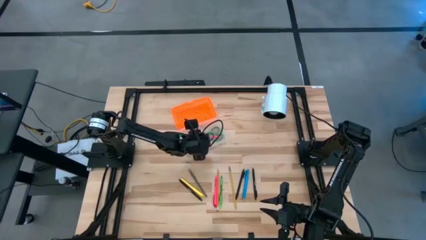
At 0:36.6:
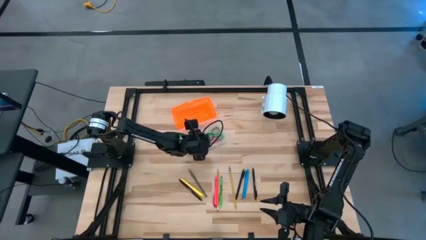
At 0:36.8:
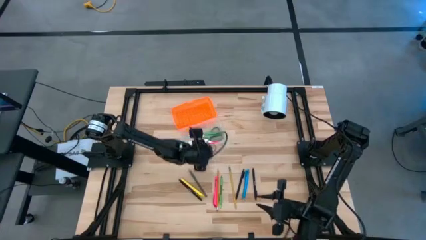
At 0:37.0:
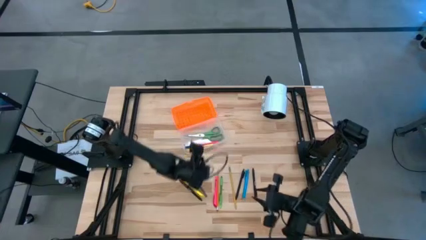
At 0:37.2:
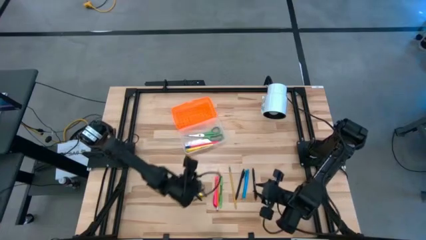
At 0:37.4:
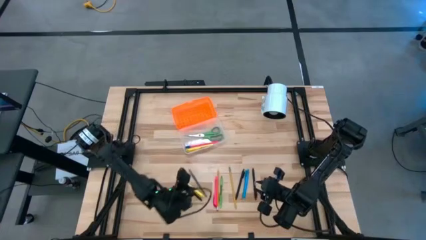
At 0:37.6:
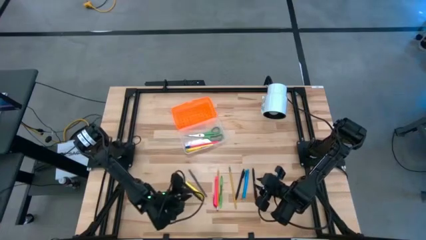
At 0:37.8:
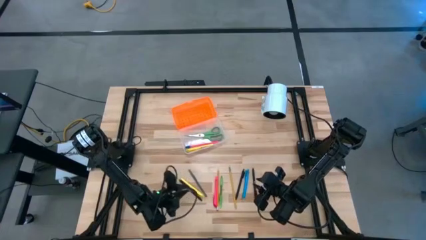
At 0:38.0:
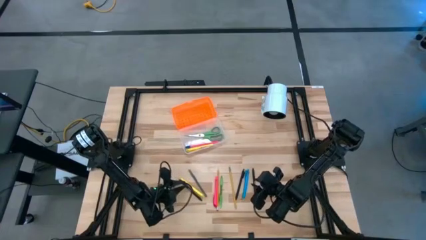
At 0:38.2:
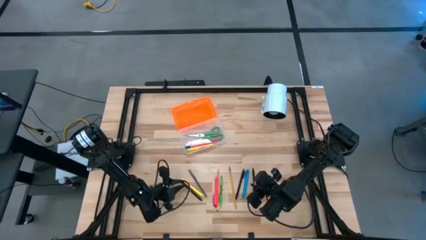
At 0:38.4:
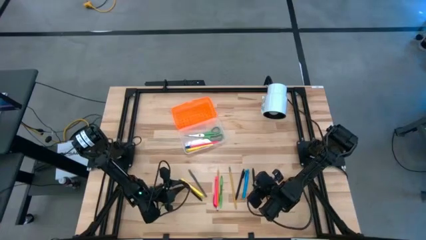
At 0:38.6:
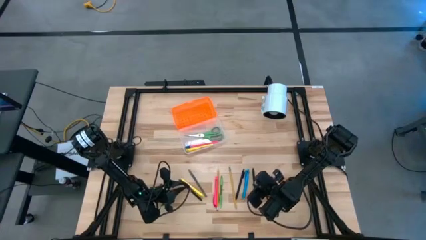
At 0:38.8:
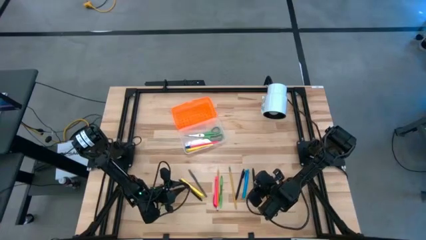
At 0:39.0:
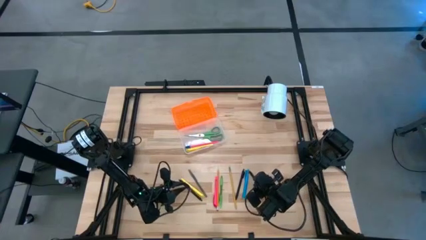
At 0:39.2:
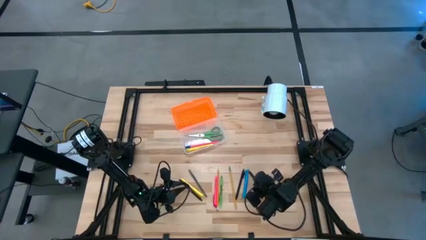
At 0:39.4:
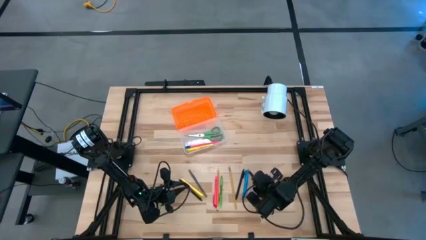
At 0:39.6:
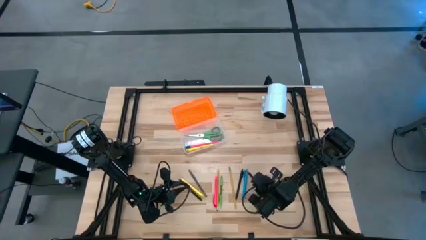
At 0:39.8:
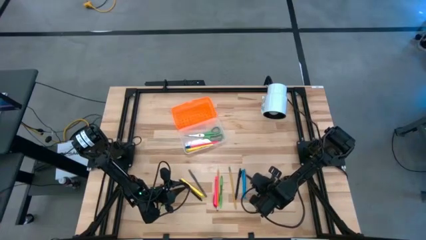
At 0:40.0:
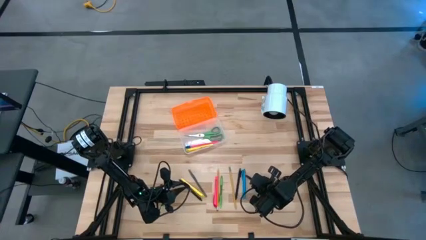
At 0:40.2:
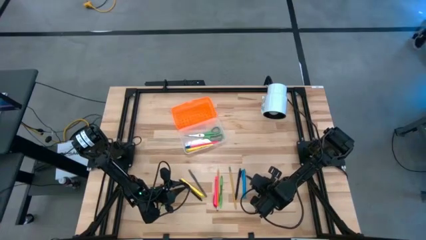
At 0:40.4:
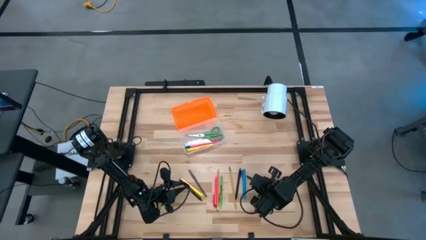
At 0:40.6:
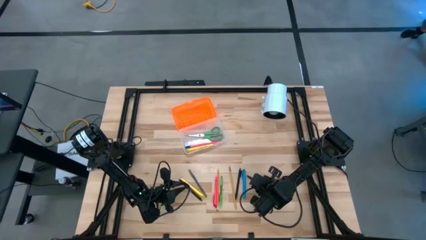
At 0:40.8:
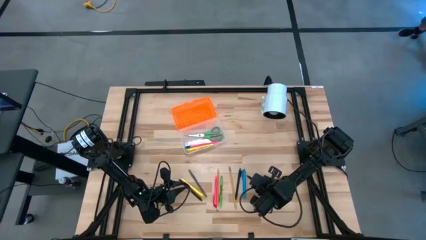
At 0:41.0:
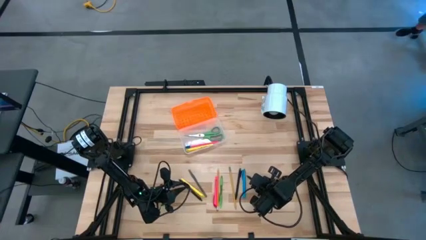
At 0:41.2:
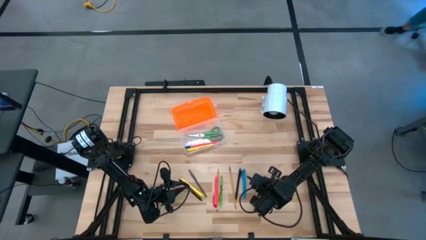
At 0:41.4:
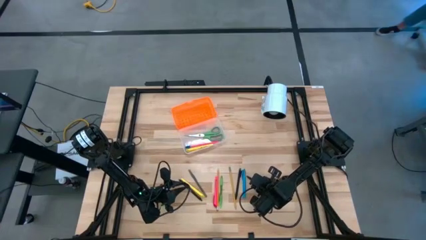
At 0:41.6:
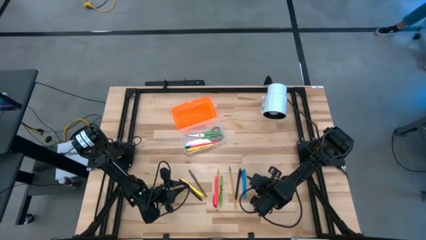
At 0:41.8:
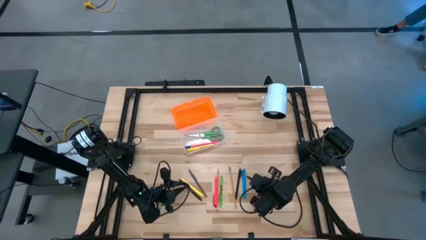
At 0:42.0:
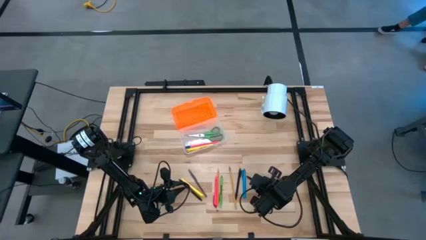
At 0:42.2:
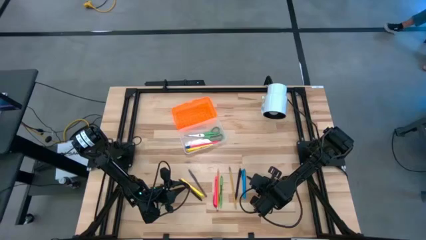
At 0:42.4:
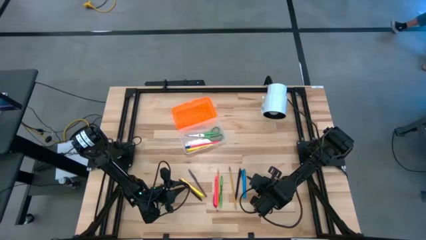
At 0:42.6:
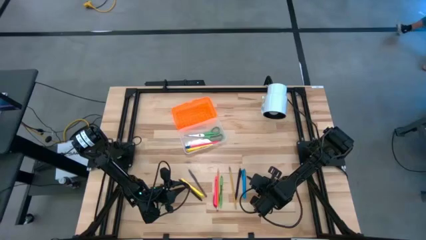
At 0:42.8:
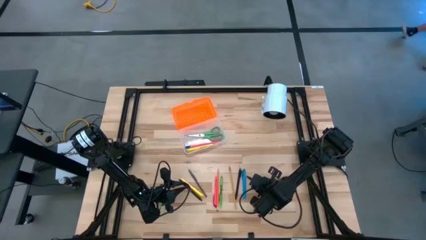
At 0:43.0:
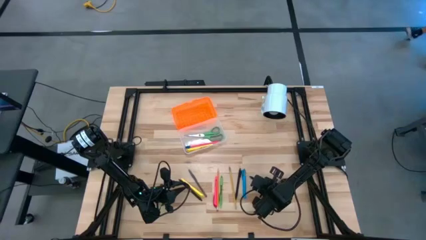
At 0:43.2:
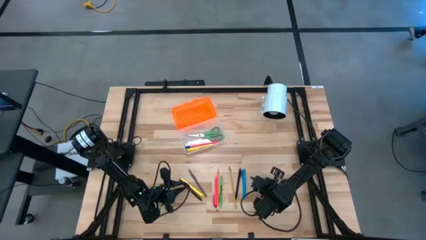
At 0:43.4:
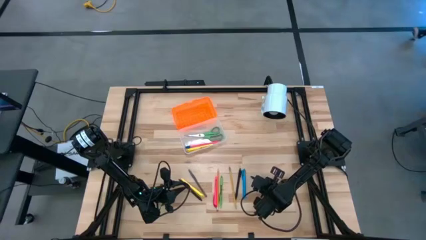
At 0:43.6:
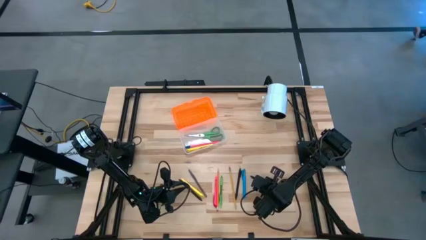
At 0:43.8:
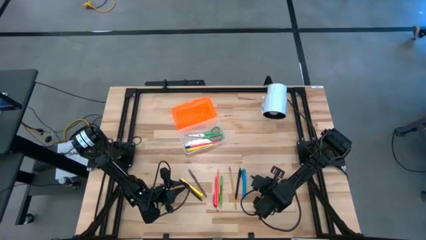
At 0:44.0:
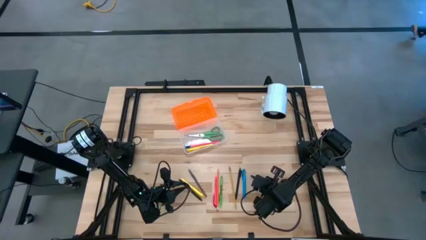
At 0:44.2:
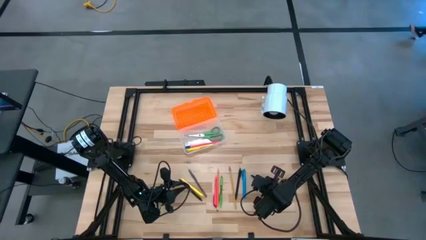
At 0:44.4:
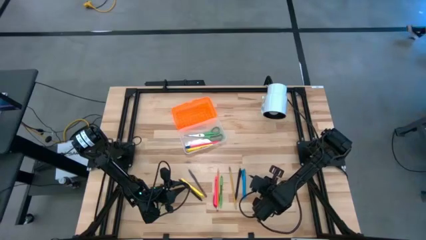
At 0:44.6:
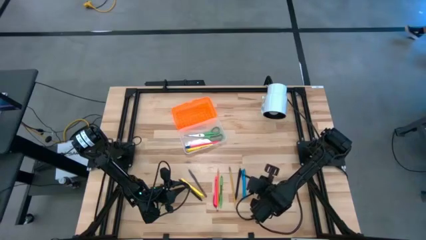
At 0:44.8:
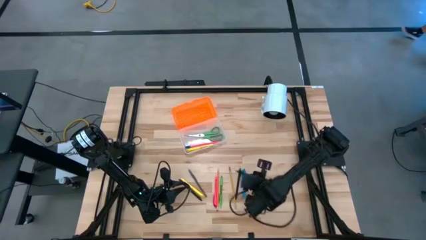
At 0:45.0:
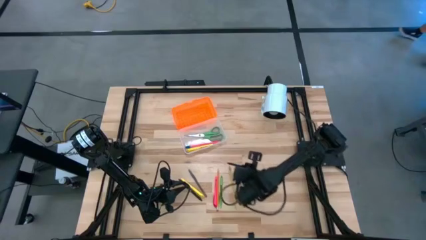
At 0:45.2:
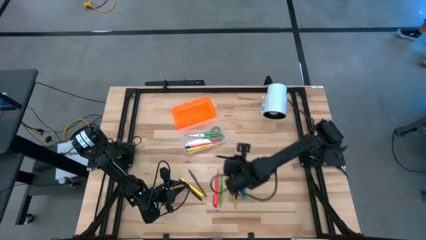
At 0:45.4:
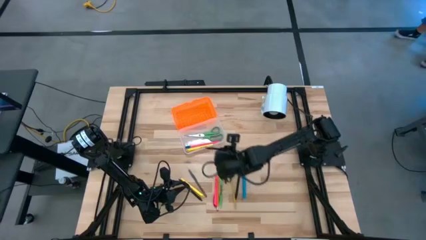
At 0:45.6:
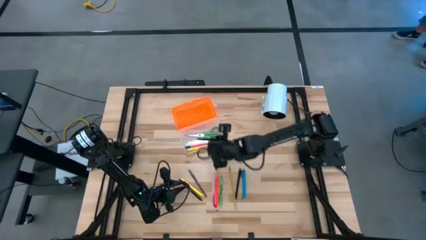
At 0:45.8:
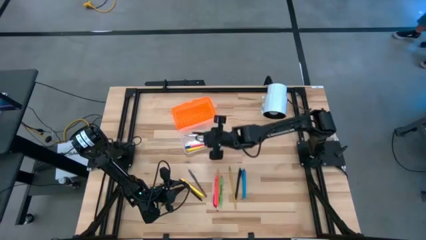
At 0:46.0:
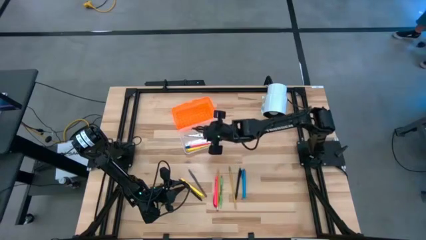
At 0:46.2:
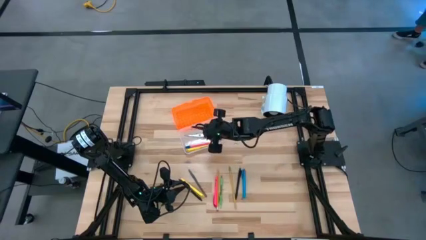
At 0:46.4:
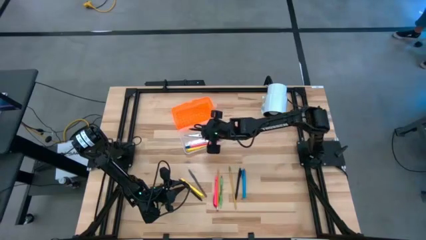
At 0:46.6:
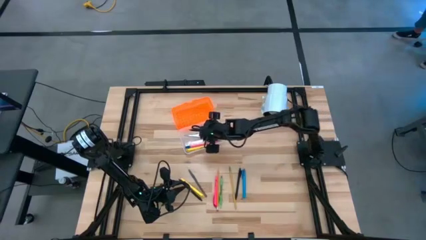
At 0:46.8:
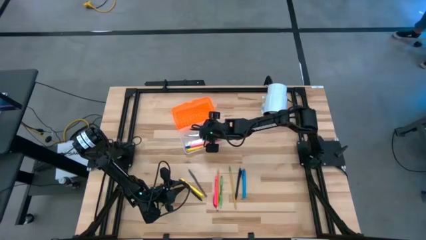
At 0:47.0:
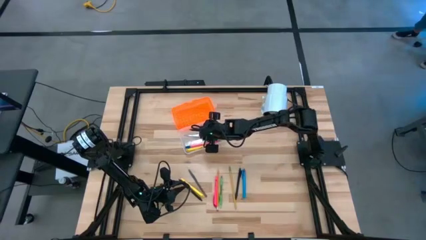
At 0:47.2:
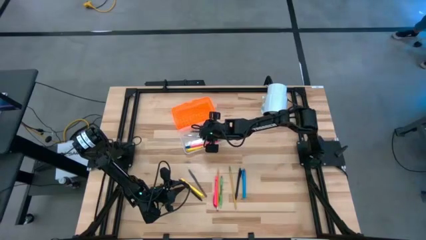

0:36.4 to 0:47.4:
Task: Pick & place school supplies into a supply box
Put the right black pen into the supply box

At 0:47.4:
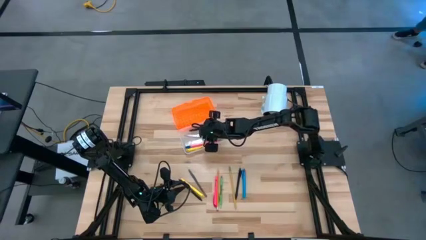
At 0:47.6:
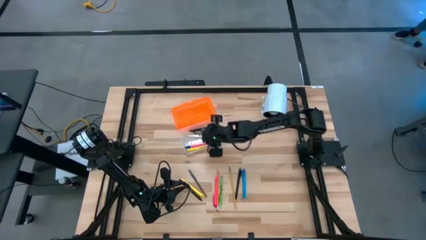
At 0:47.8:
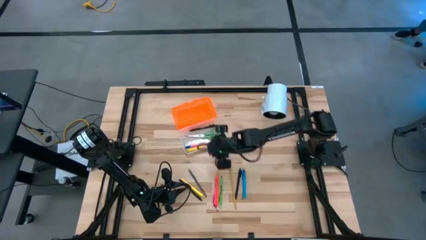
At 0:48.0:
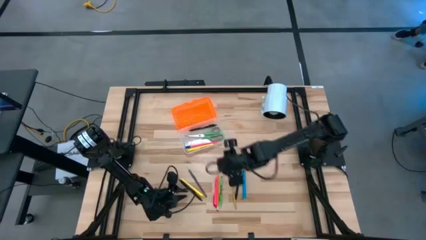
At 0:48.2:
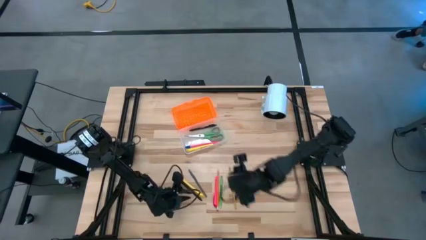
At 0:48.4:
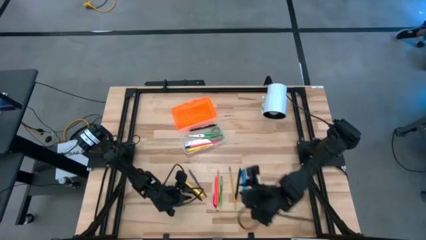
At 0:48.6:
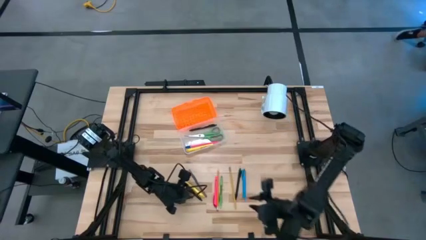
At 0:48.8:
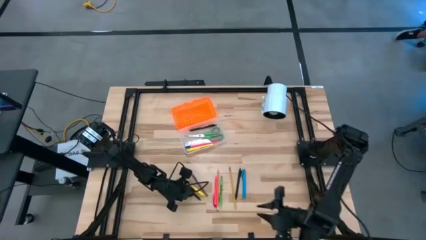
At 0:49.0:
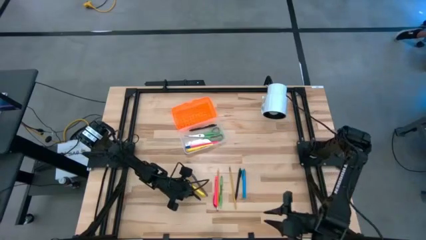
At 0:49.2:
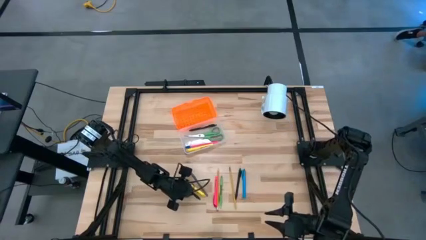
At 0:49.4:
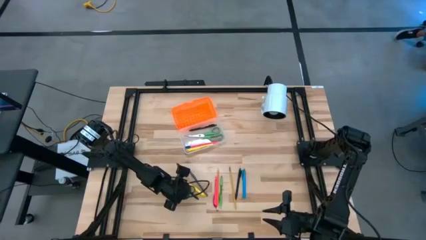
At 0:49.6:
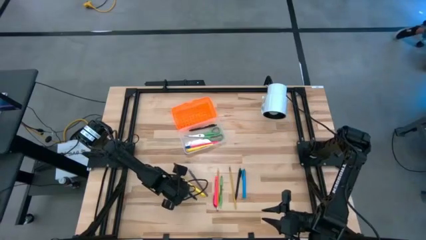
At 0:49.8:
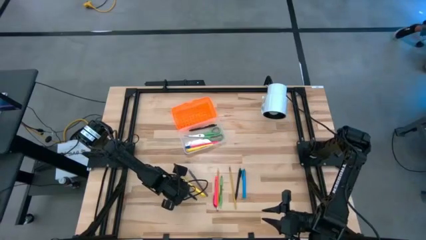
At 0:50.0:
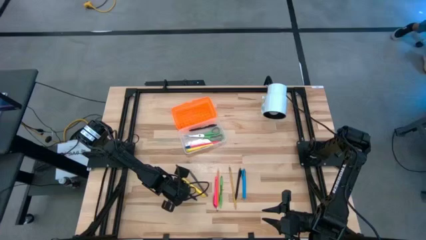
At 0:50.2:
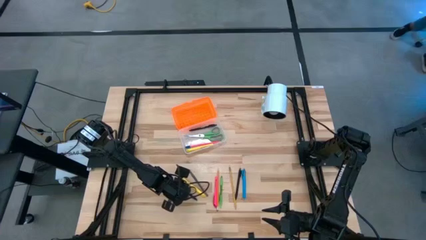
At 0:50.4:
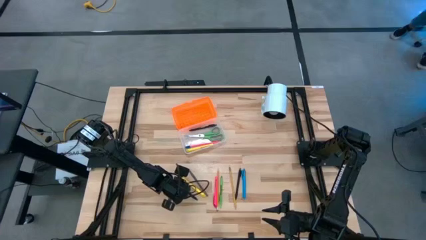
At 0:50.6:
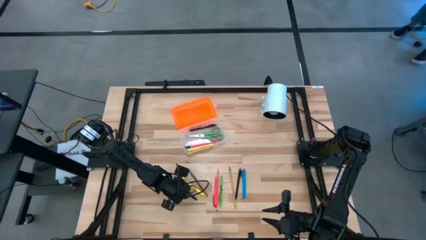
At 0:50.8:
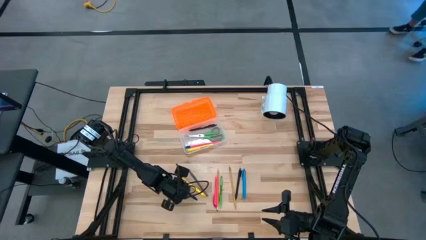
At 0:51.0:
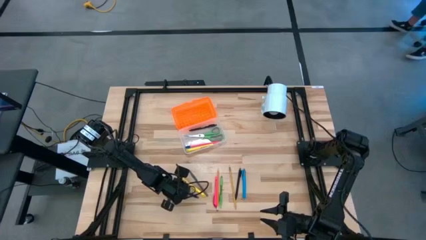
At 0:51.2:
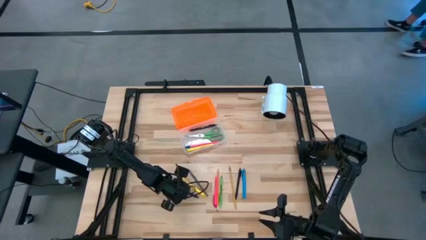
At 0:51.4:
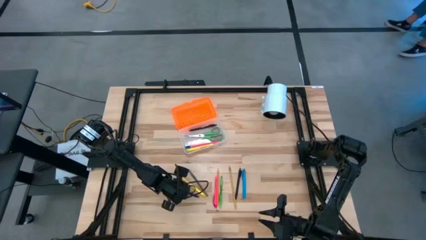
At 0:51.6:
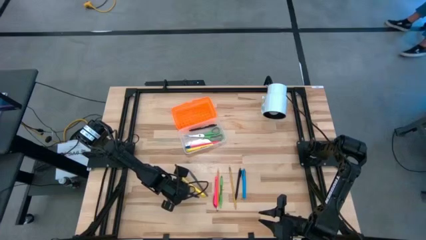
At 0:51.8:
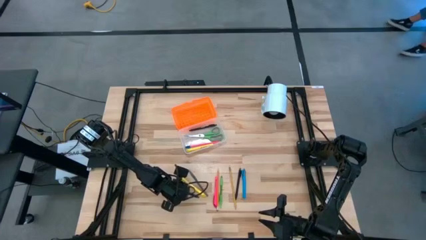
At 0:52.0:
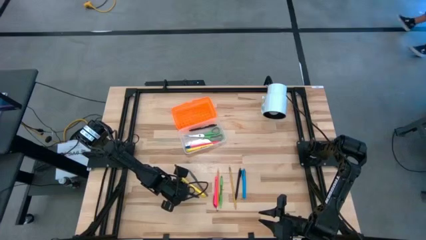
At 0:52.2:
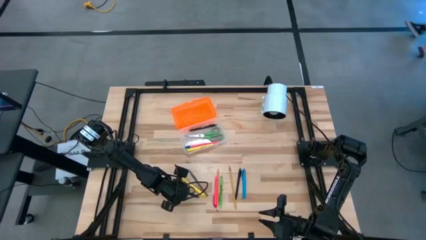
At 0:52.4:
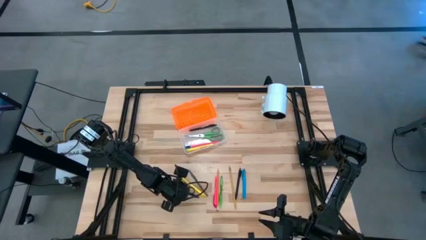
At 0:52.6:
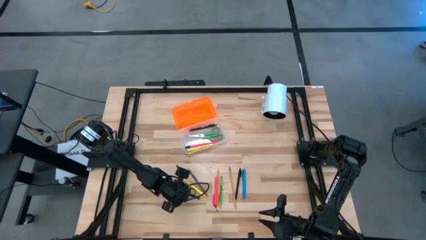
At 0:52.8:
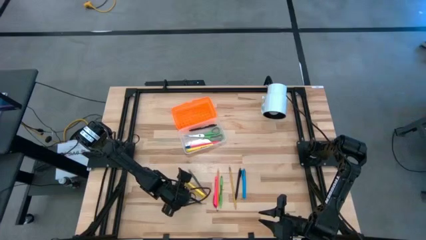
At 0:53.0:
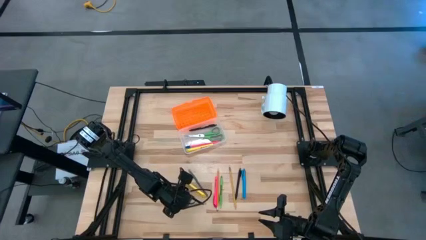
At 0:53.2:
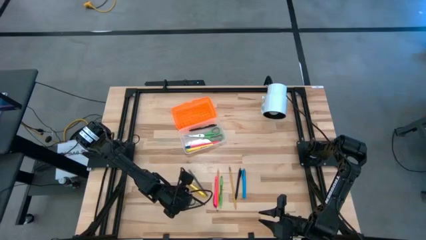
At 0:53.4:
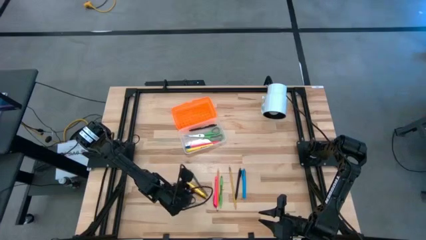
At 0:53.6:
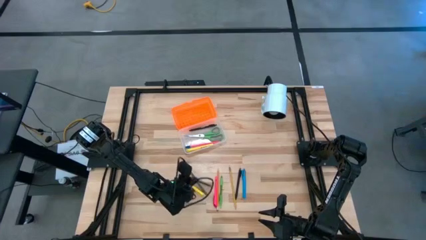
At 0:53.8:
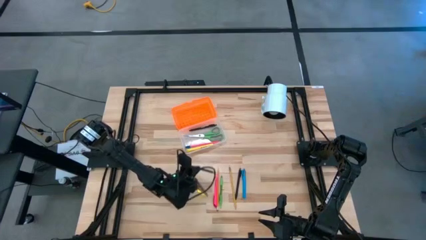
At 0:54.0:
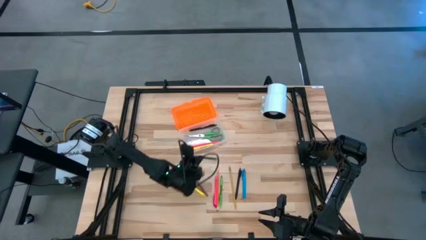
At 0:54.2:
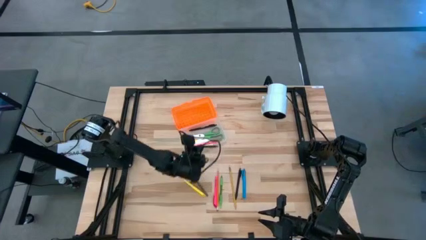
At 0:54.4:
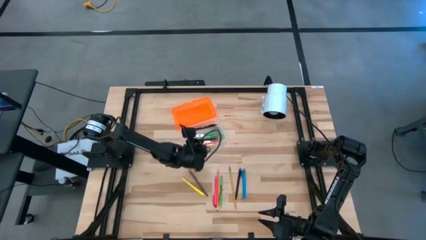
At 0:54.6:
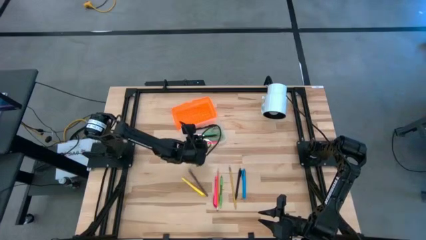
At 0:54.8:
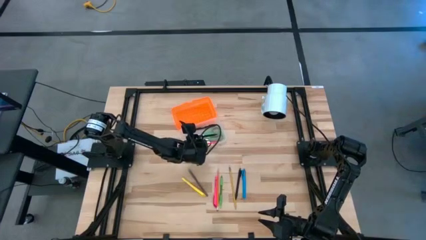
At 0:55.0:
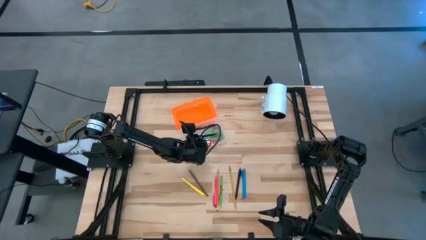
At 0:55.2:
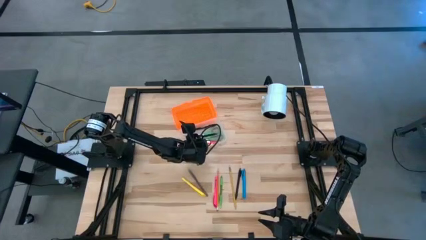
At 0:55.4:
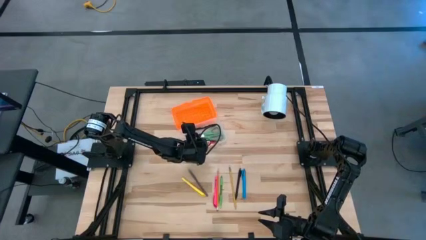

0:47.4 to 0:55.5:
Put the left black pen into the supply box
